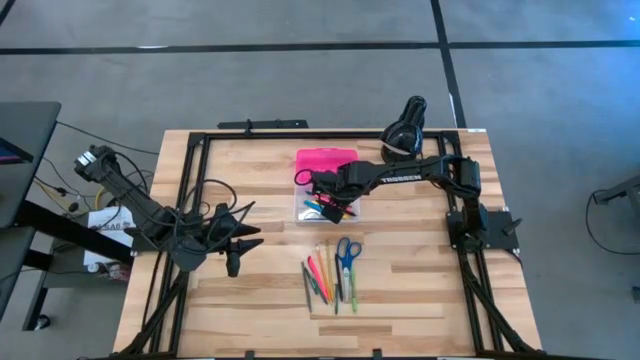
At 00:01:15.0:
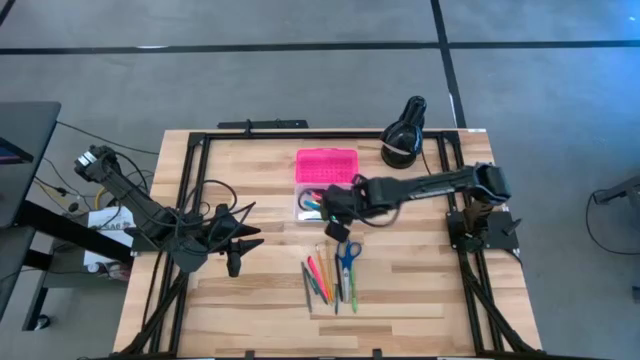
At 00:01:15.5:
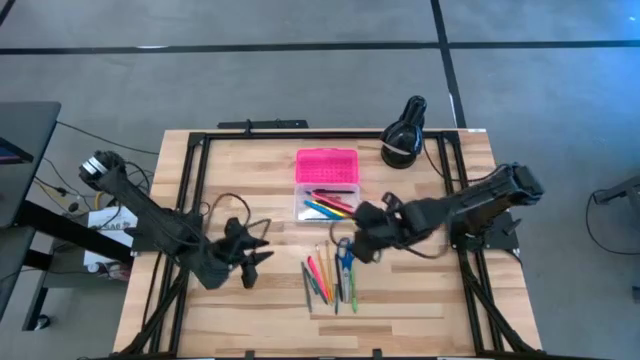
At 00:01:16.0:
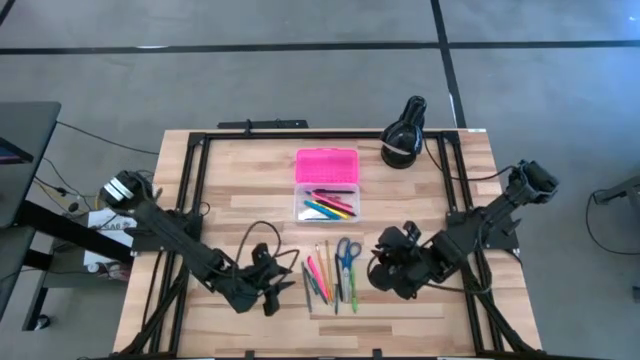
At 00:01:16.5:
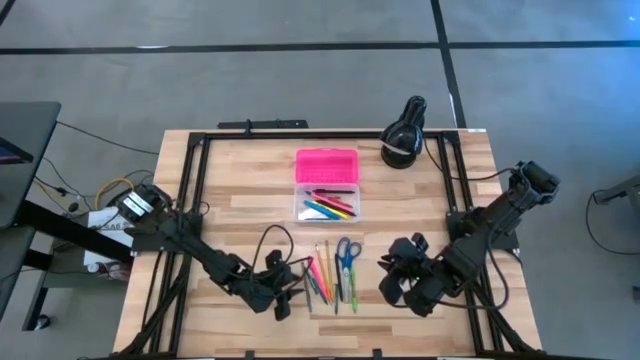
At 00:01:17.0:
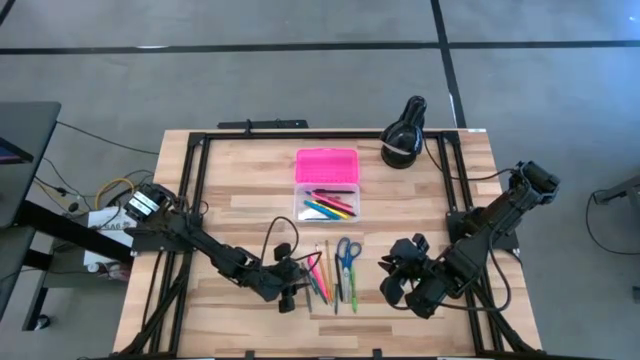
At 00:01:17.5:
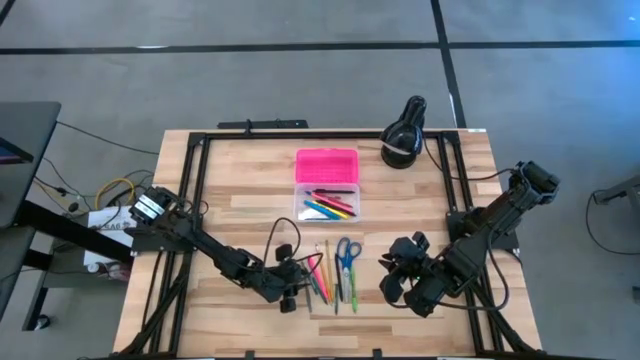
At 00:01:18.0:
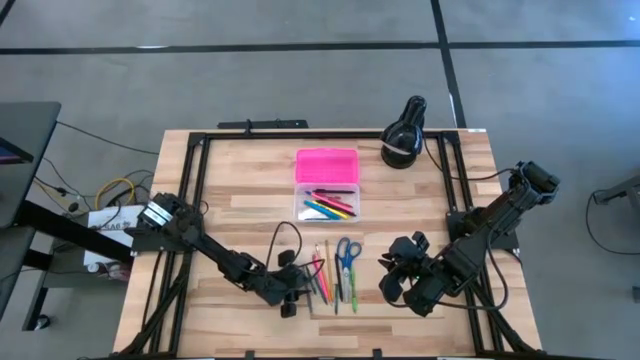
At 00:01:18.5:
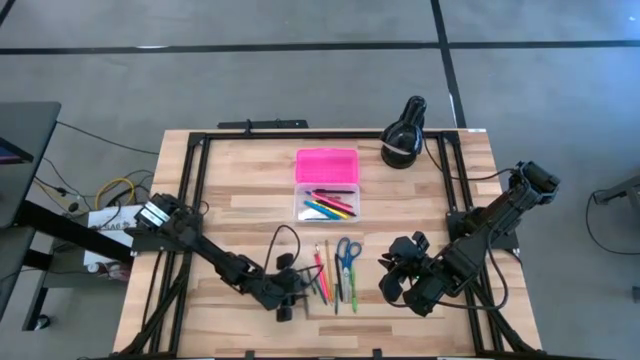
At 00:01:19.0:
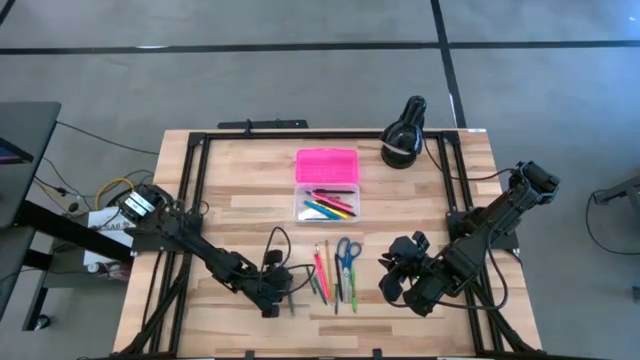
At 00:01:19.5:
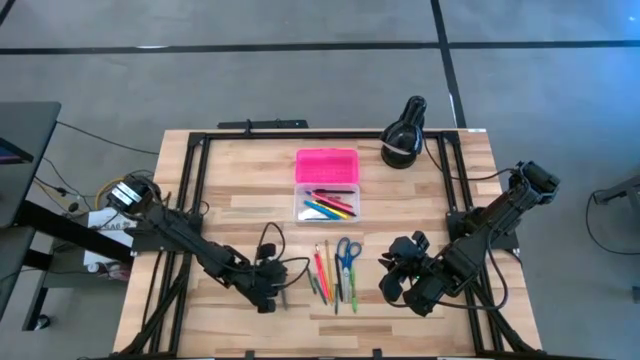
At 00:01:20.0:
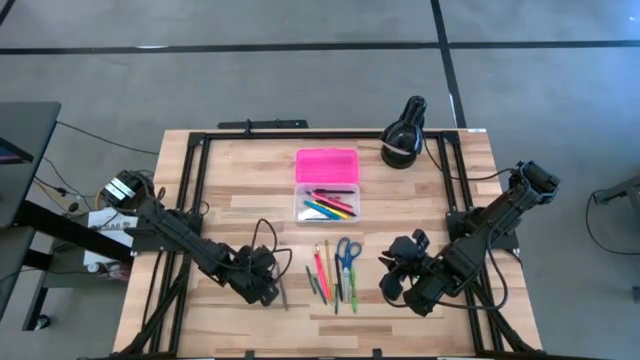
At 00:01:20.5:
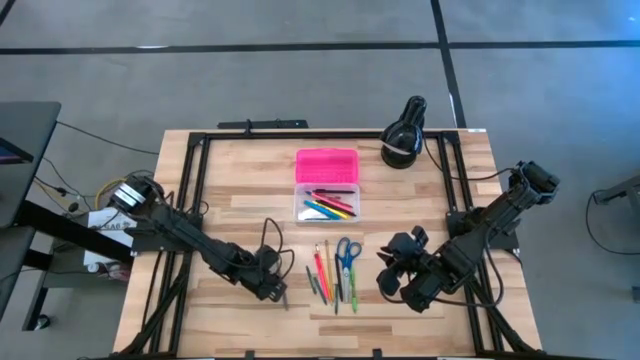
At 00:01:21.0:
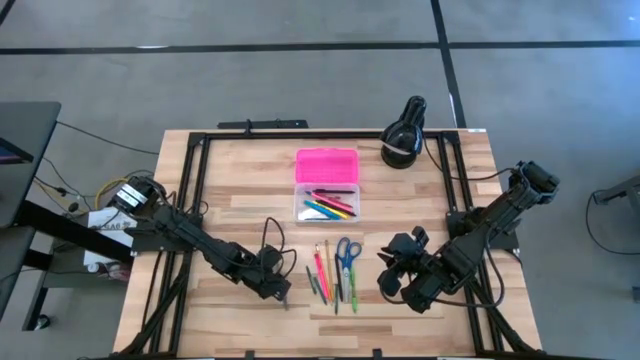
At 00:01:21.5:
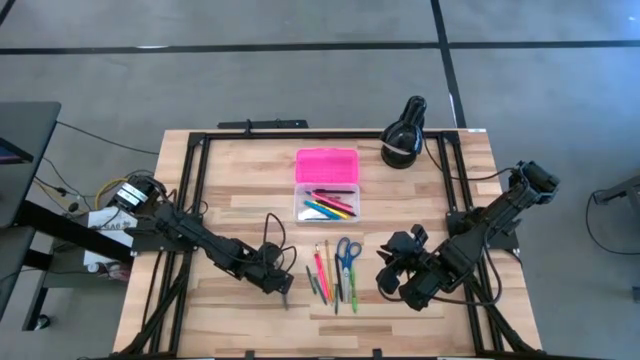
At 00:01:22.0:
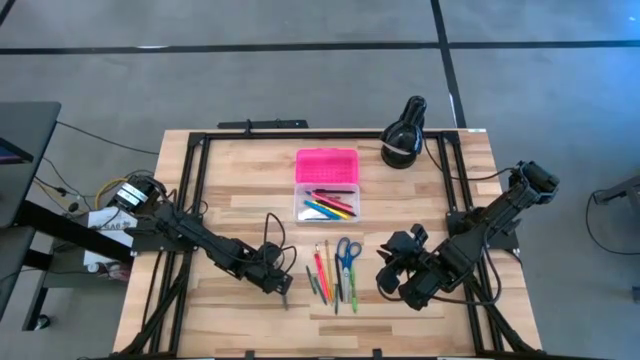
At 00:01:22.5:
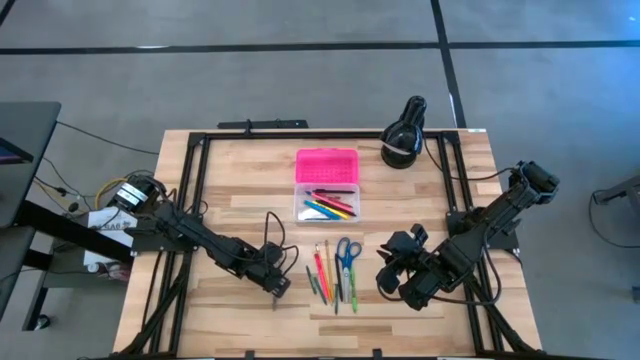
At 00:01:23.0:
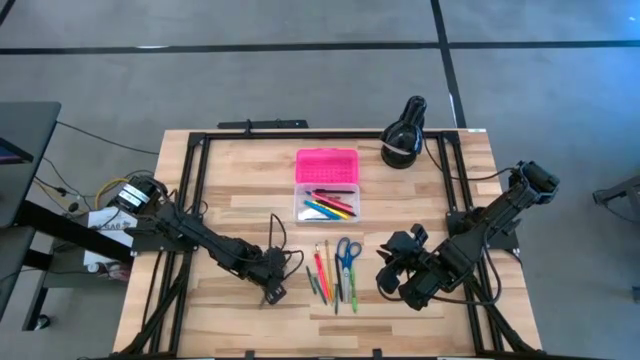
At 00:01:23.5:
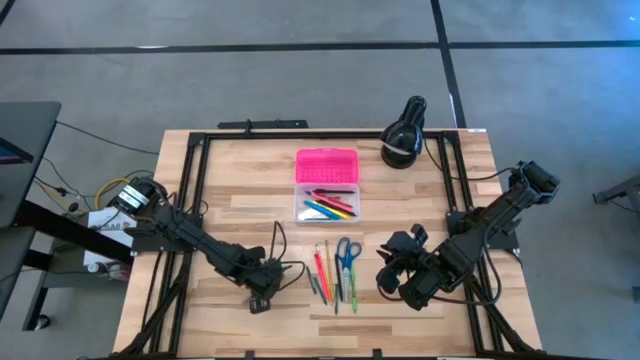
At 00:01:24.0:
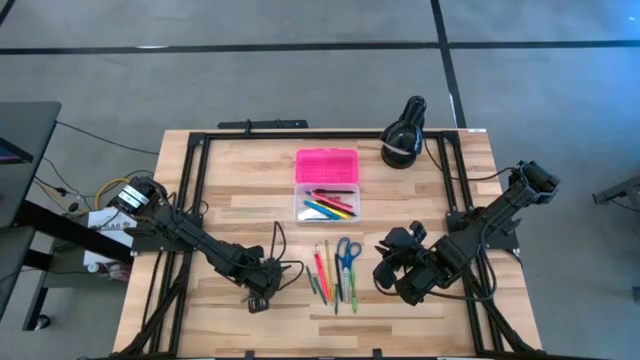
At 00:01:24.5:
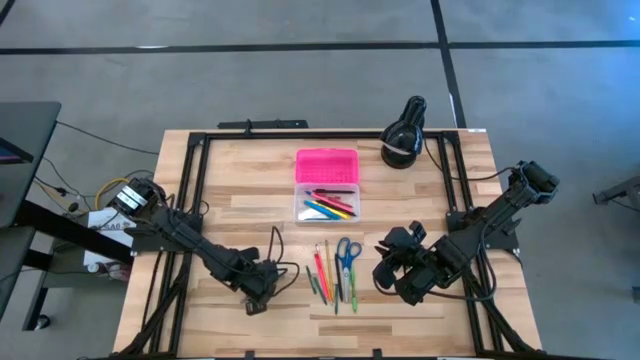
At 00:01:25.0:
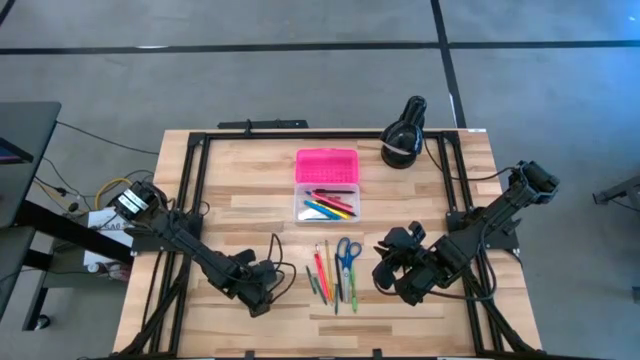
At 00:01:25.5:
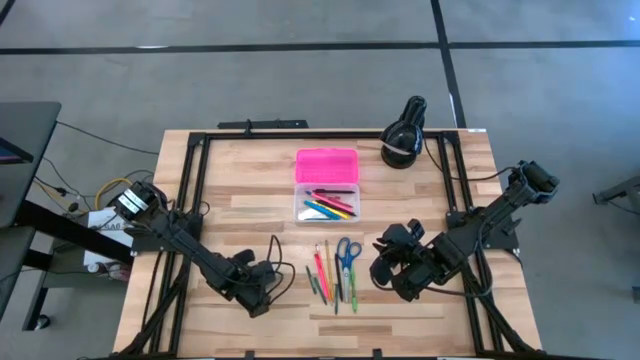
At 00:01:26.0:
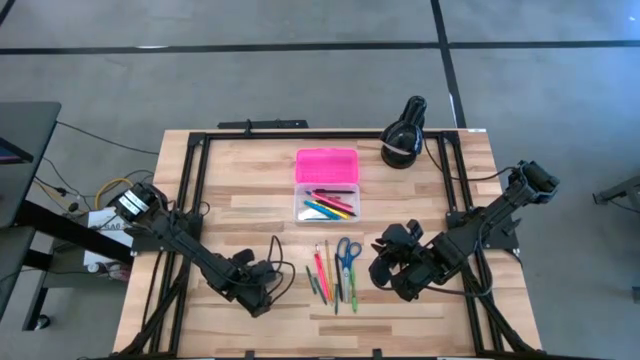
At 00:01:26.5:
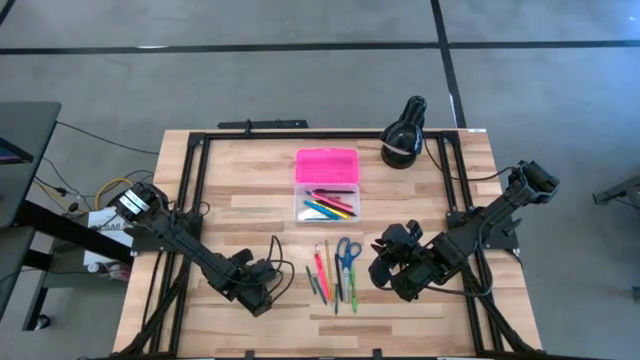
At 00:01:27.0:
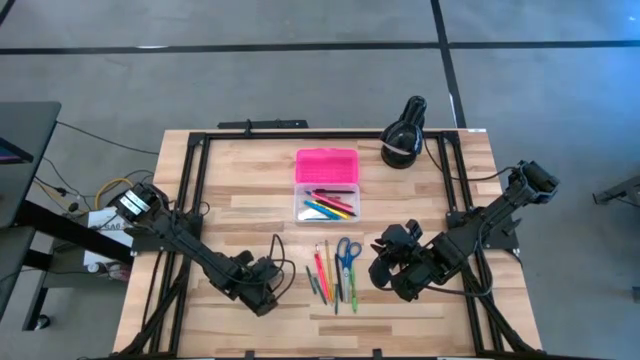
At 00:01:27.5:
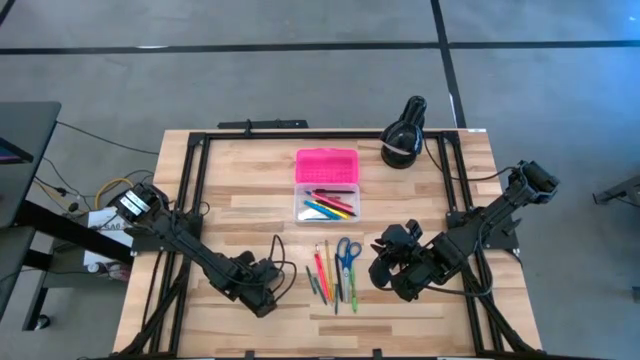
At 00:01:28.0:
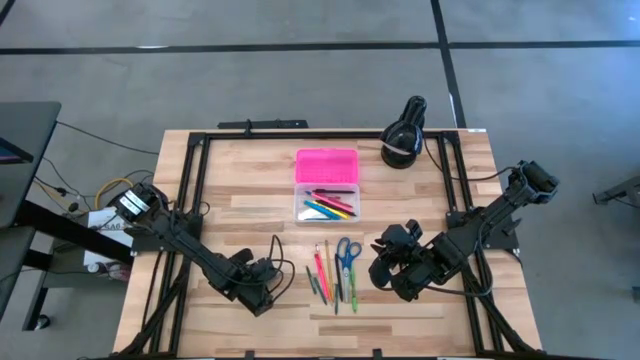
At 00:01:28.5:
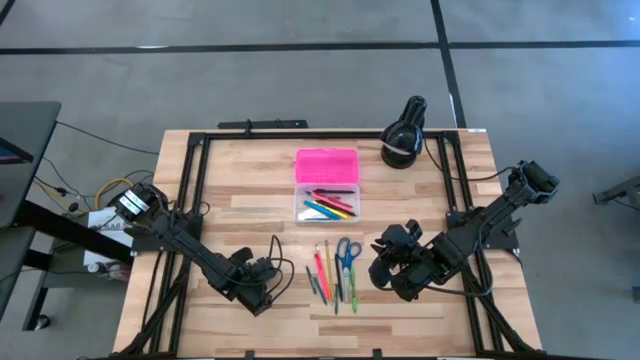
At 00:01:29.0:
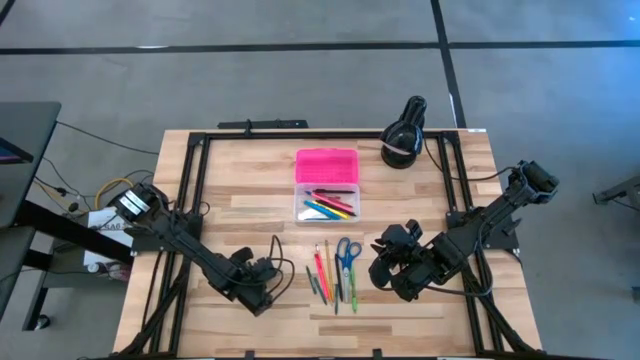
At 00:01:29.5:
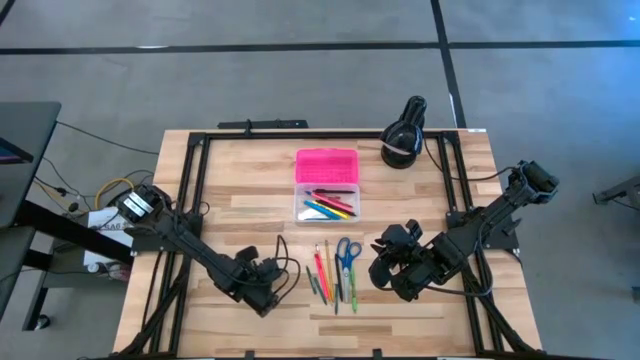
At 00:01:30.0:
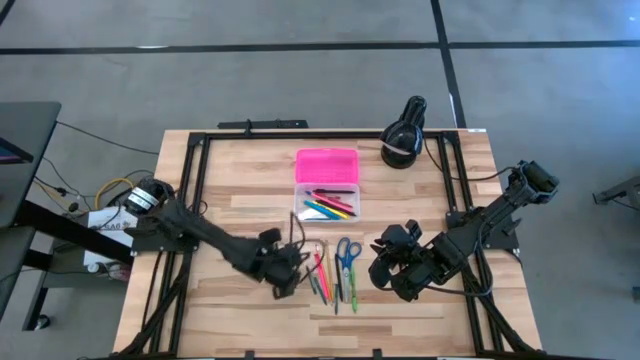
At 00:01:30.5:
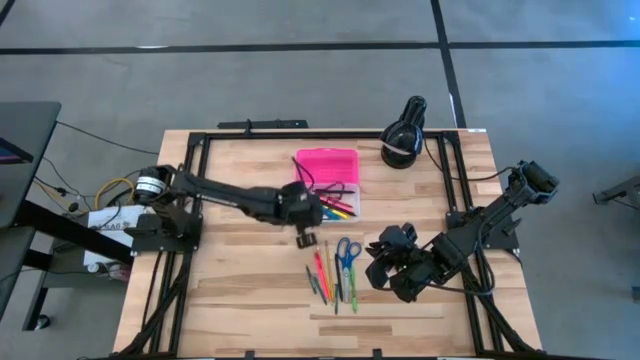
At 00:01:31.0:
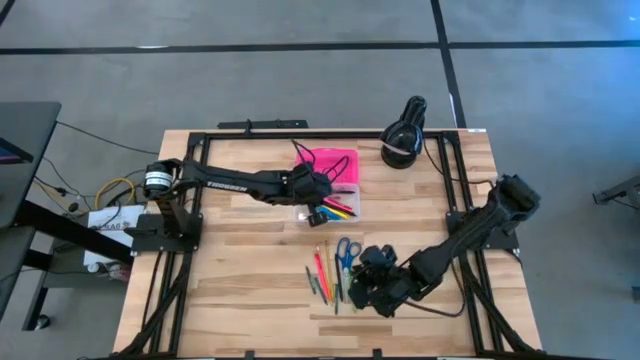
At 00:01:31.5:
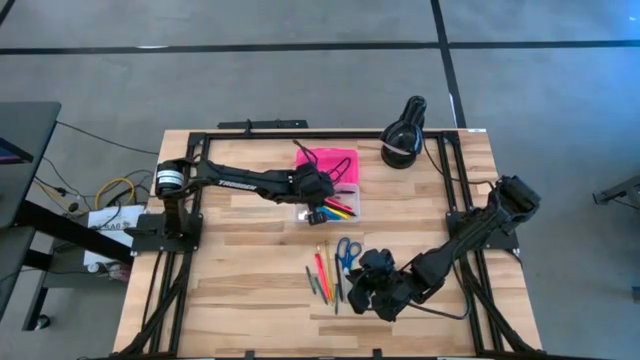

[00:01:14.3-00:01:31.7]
Task: Pick & place school supplies into a supply box
Put the gray pen into the pink supply box

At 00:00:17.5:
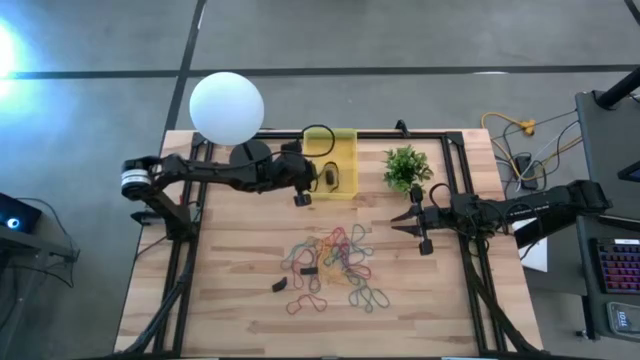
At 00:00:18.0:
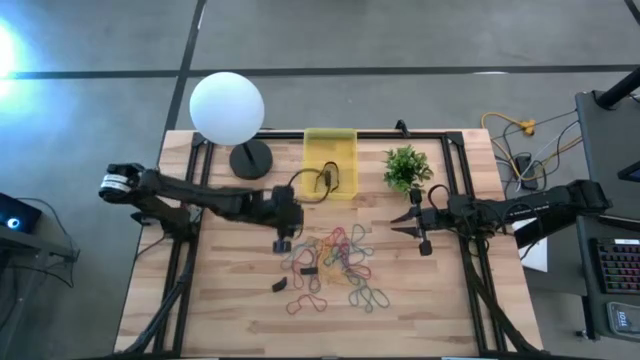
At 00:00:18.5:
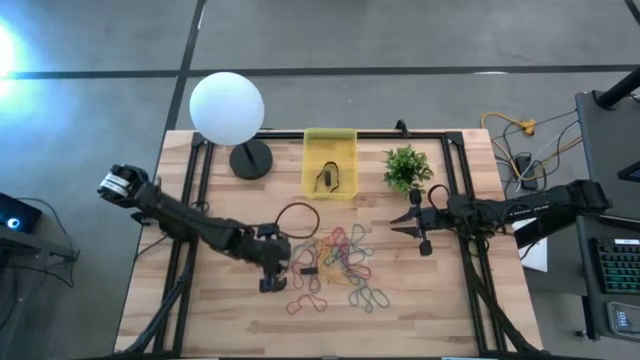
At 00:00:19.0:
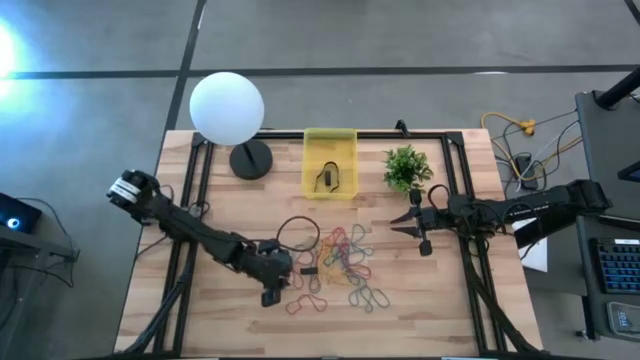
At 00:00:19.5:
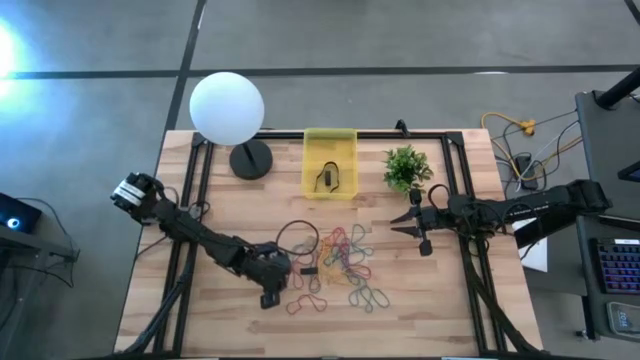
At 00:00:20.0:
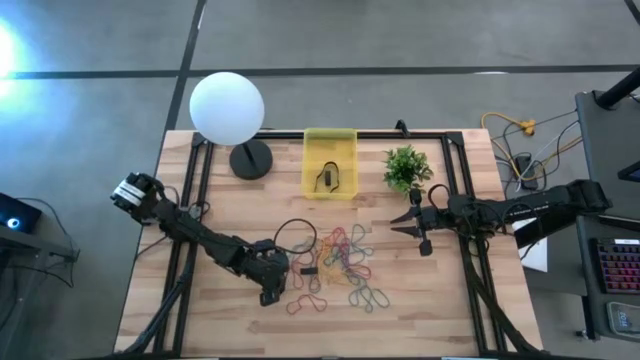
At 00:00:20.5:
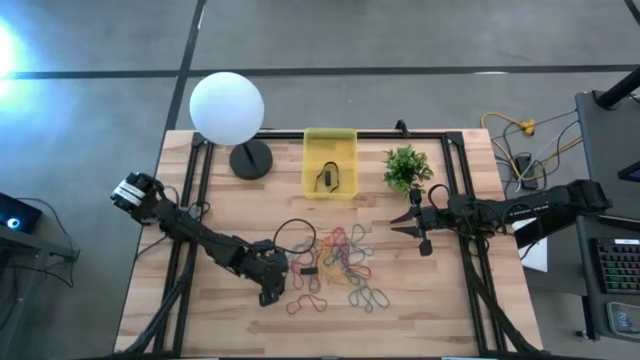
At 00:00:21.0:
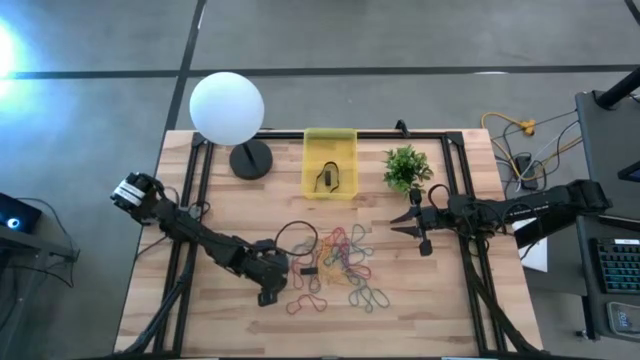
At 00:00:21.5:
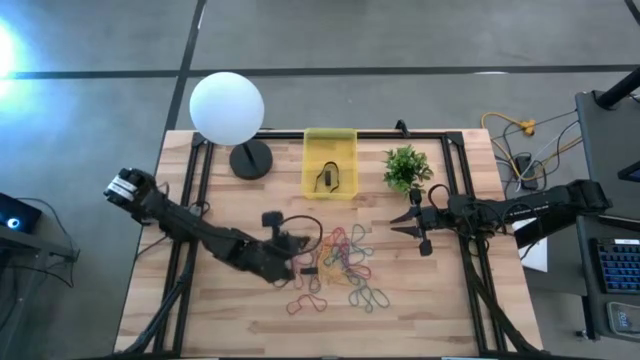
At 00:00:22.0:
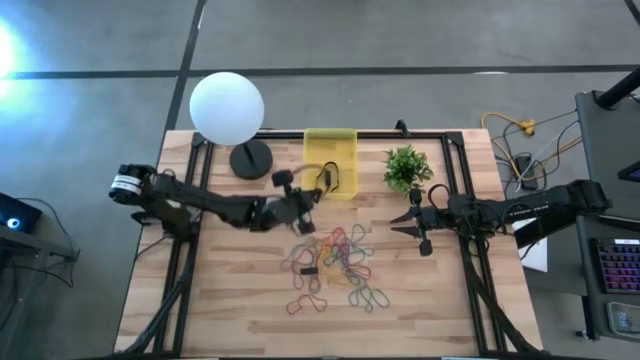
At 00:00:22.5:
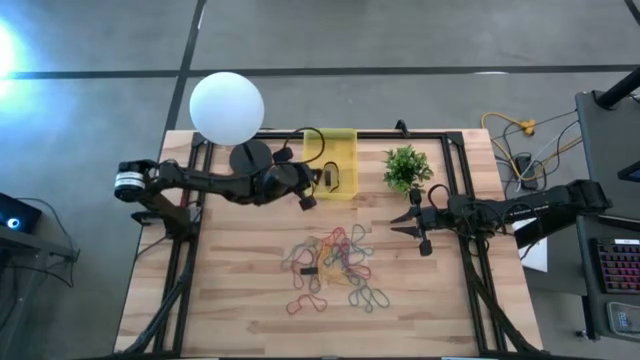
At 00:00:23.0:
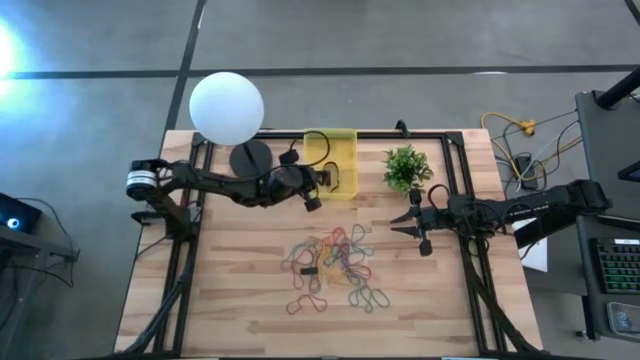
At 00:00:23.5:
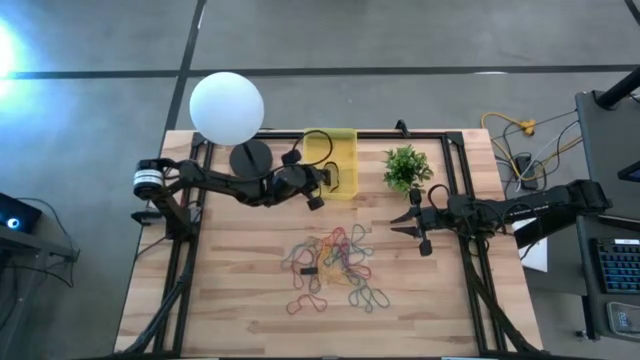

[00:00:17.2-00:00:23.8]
Task: Pick and place rubber bands into bin
Put the black rubber band into the yellow bin
